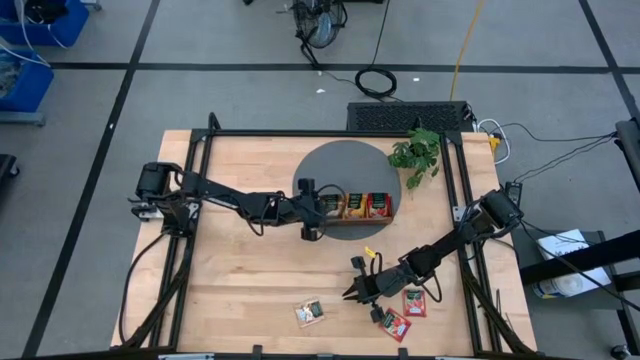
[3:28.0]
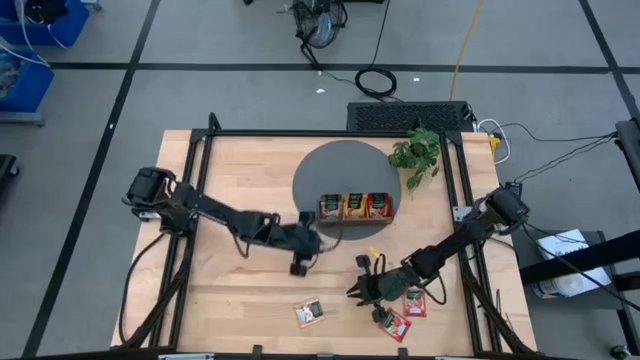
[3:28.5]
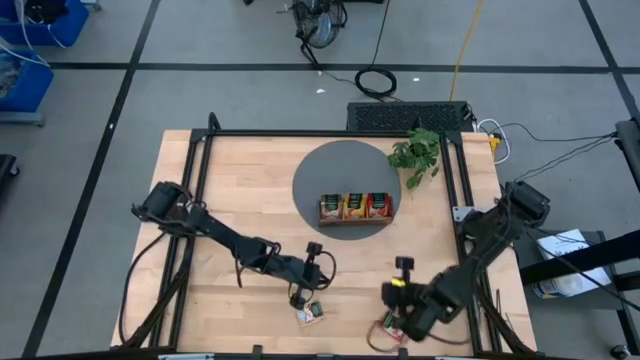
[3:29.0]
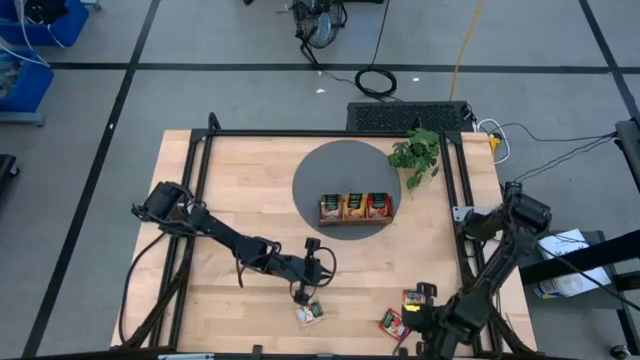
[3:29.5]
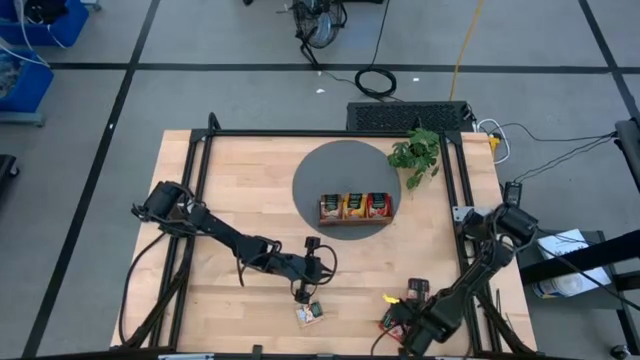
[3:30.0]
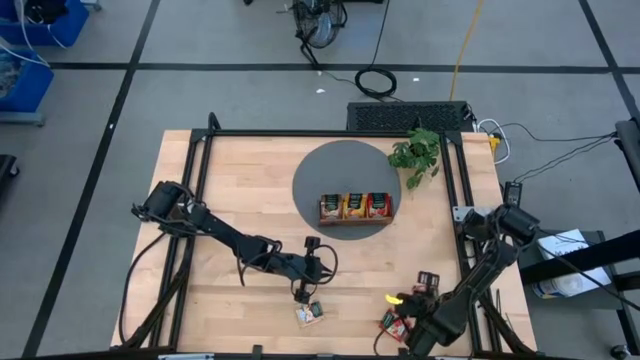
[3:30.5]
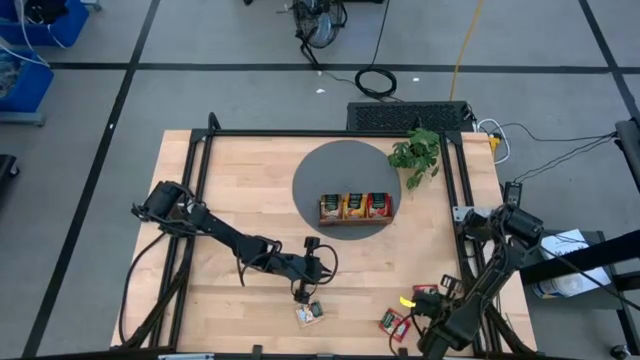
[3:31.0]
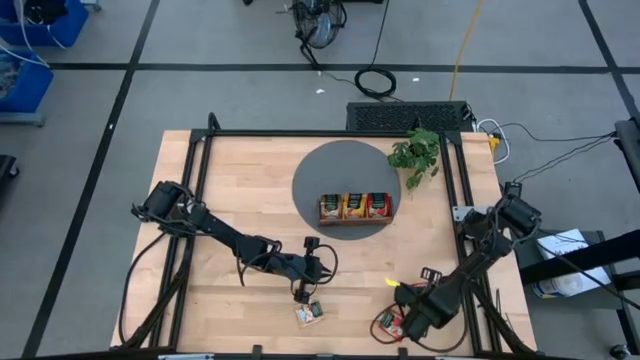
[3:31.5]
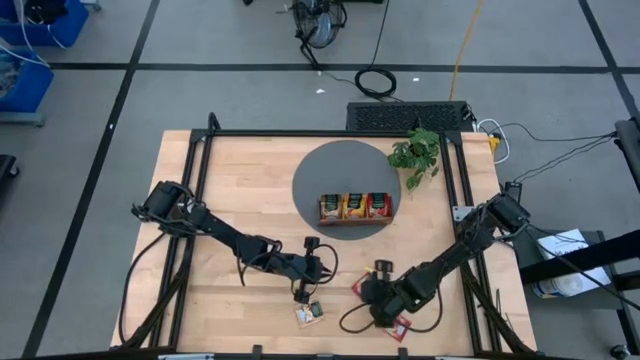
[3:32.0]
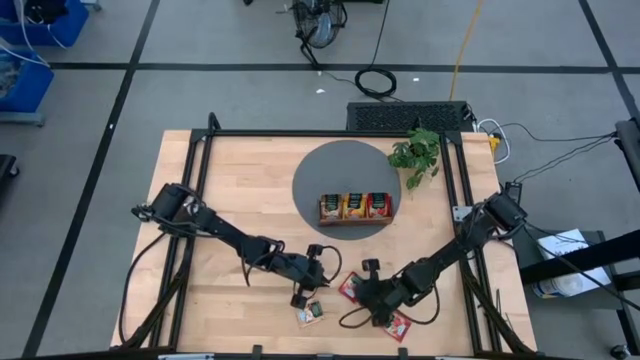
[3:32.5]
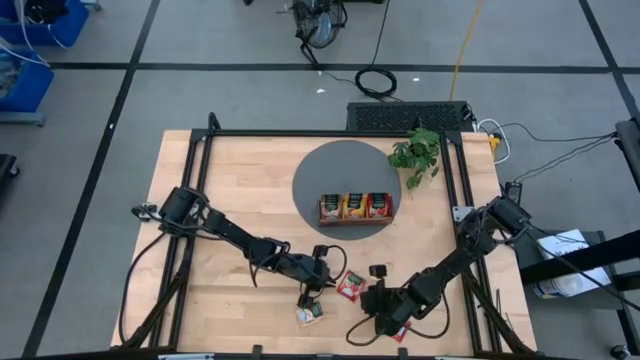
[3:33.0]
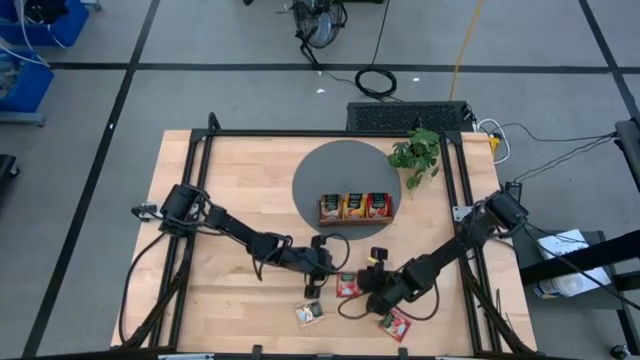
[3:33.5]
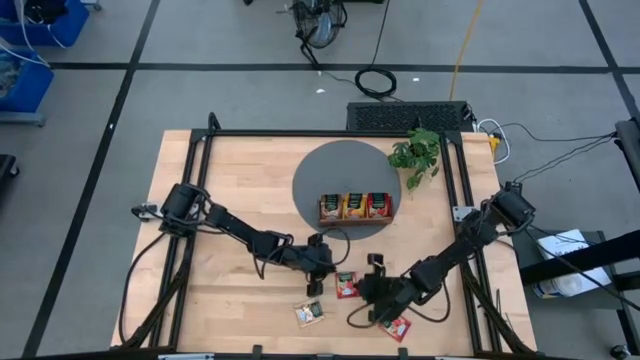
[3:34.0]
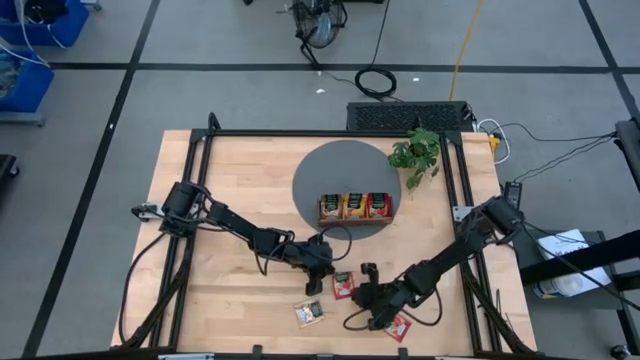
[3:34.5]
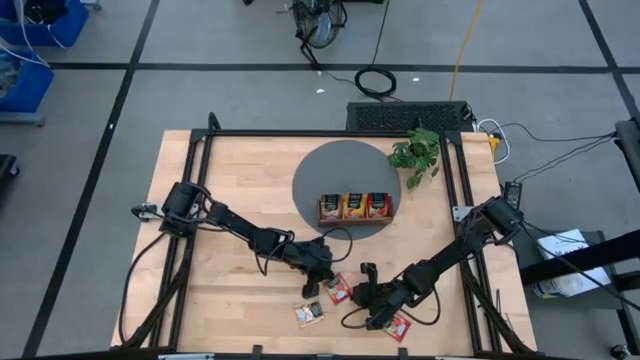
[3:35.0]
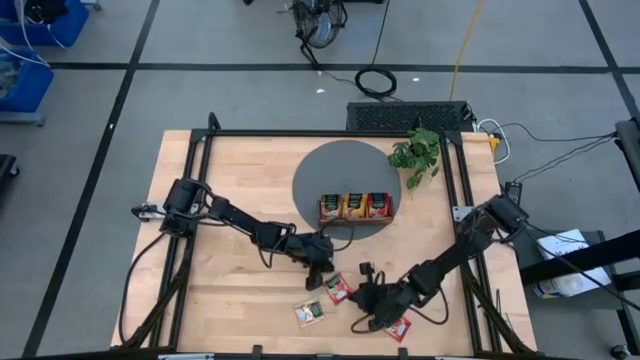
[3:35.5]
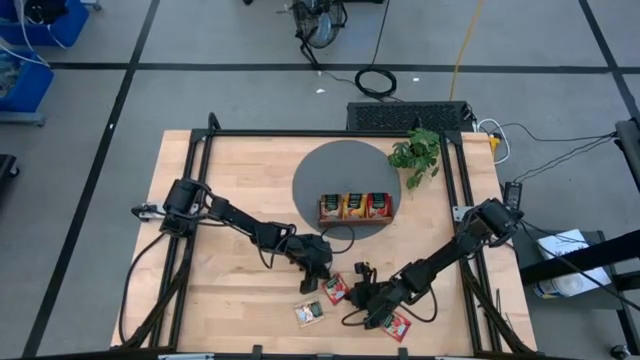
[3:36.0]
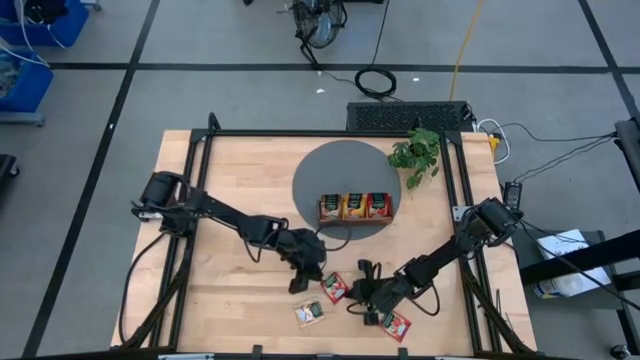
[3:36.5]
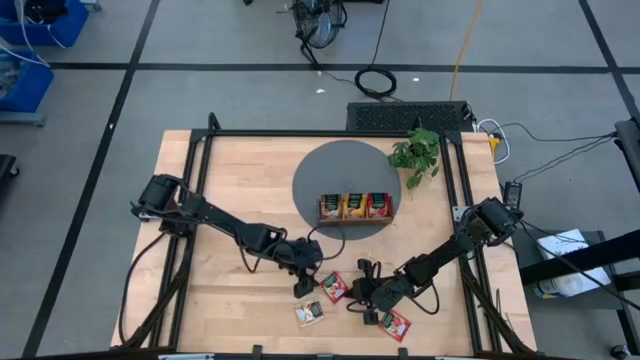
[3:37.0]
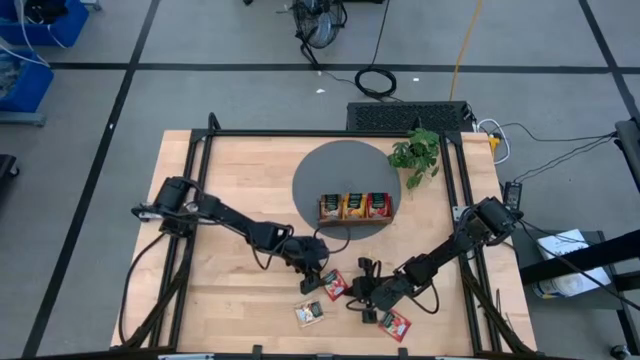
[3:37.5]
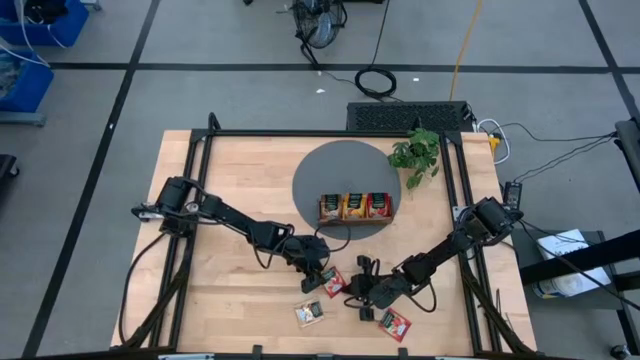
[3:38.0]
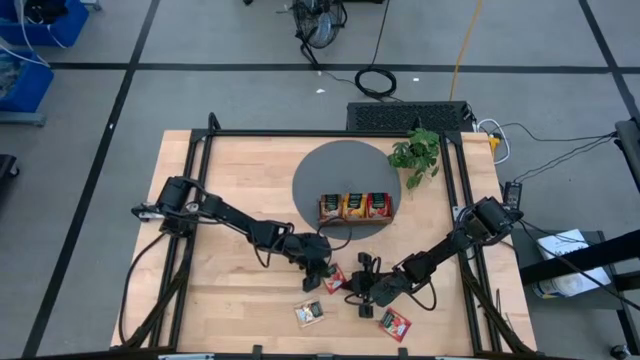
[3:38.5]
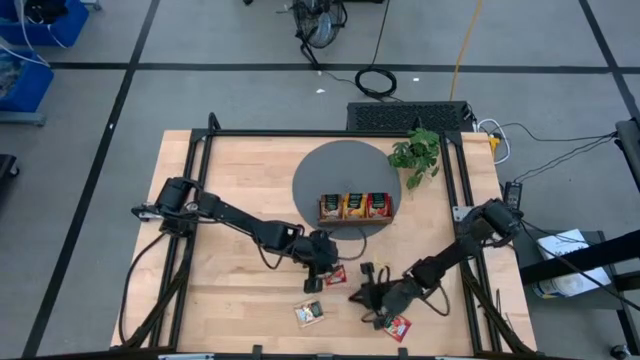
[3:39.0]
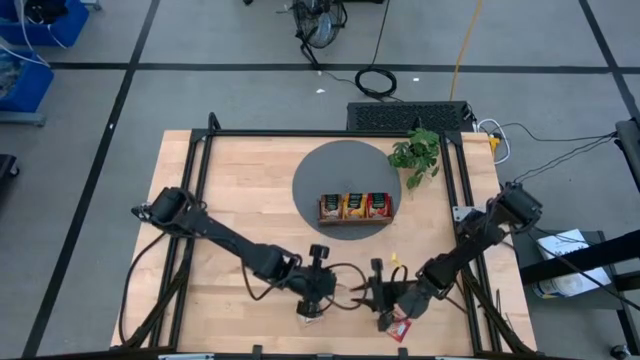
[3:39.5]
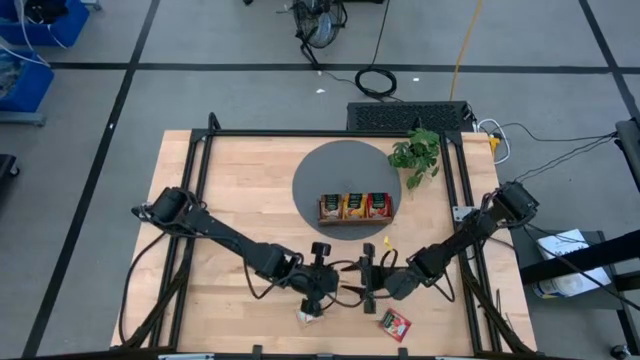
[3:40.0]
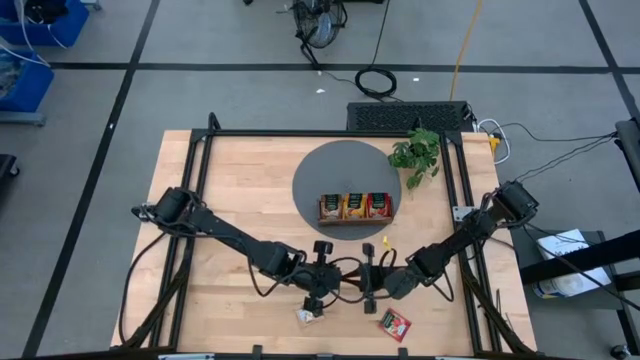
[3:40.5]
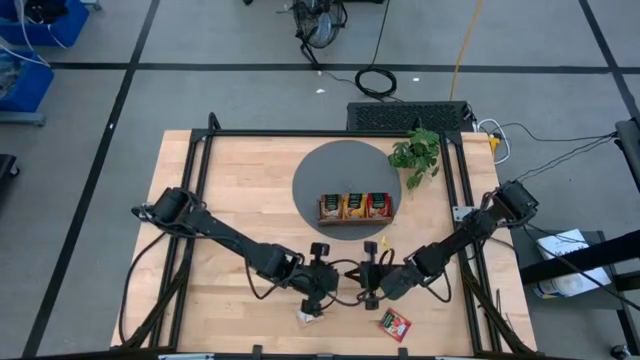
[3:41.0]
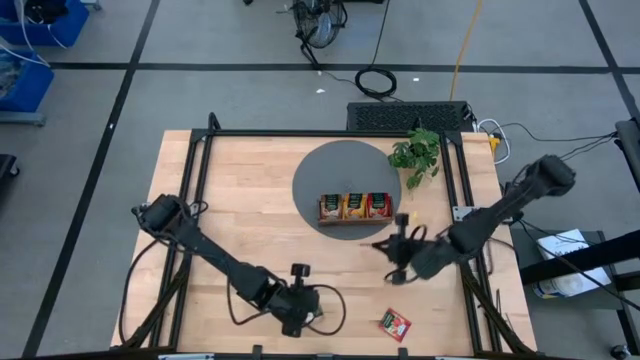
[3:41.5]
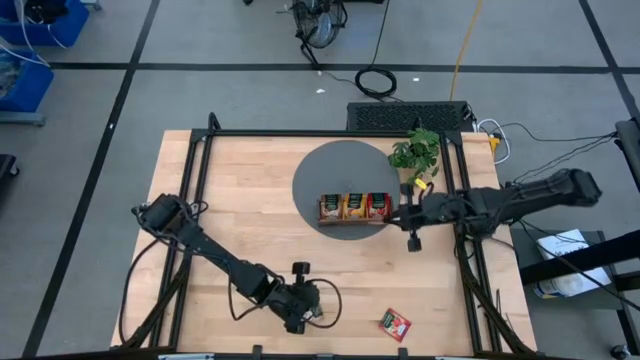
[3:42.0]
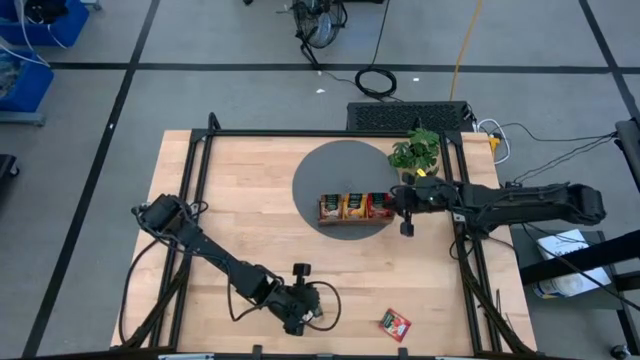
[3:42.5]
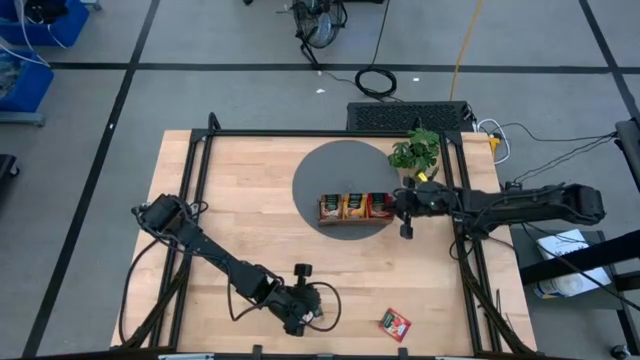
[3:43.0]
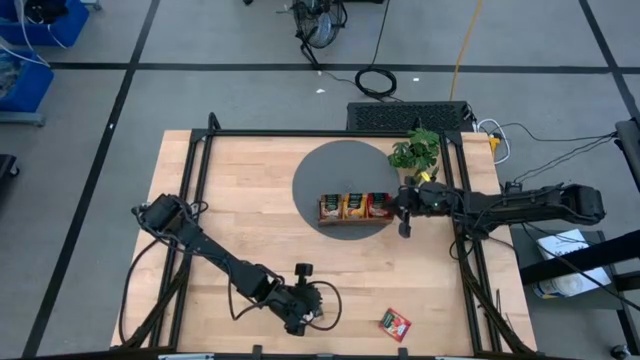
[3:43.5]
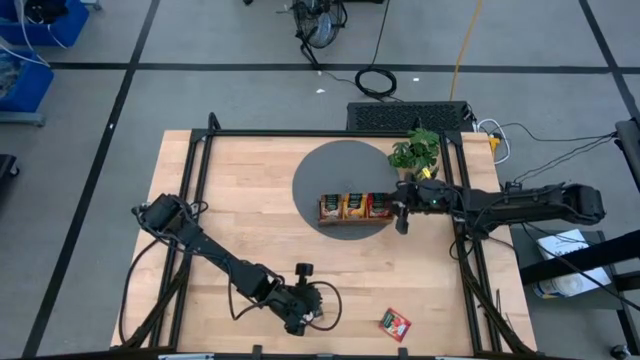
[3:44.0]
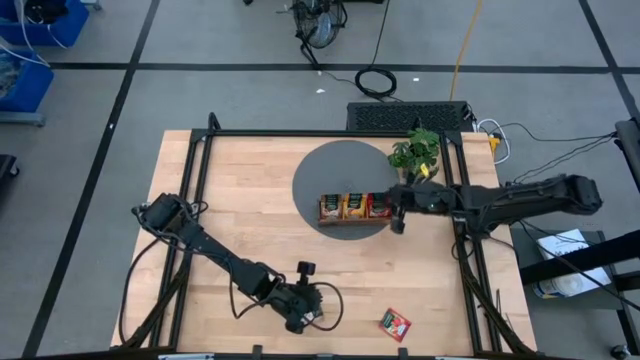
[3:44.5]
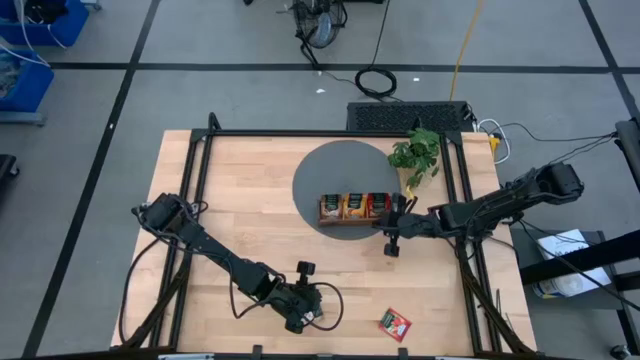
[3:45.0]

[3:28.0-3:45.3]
Task: Pick & Place Tea
Put the red tea bag into the right section of the wooden organizer

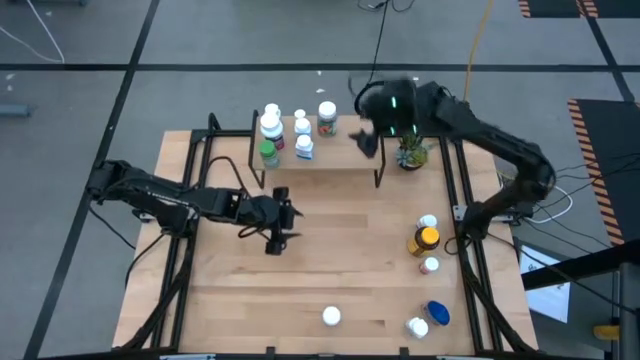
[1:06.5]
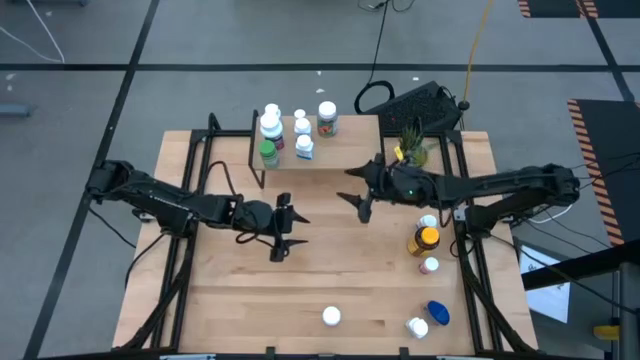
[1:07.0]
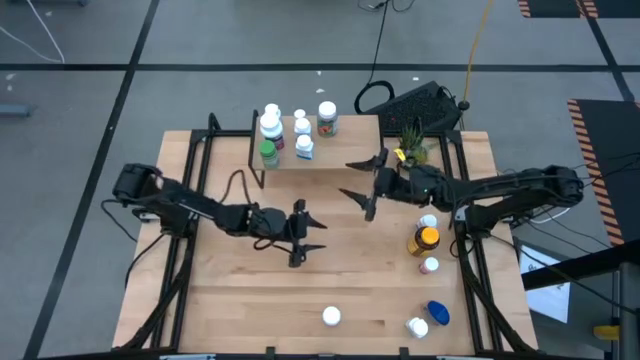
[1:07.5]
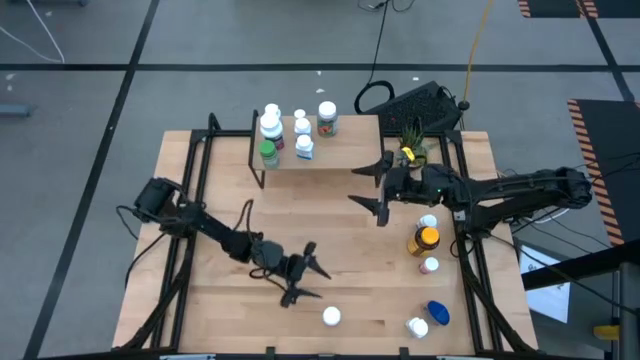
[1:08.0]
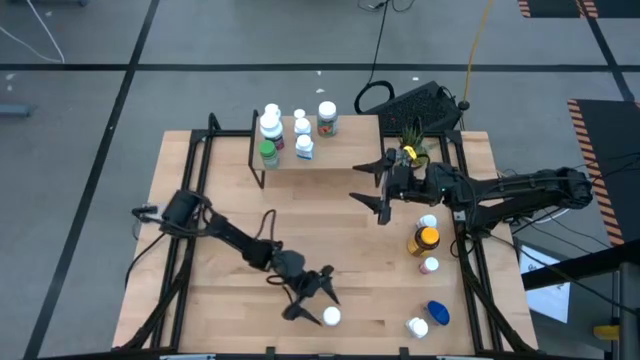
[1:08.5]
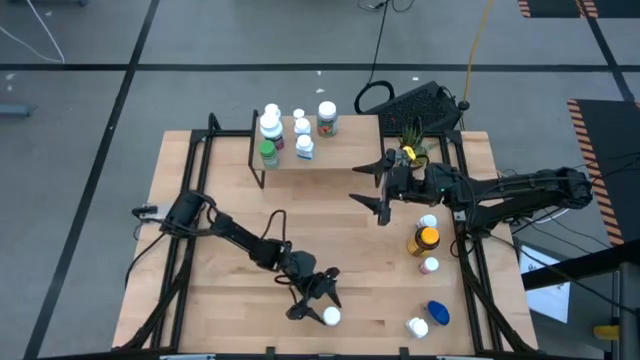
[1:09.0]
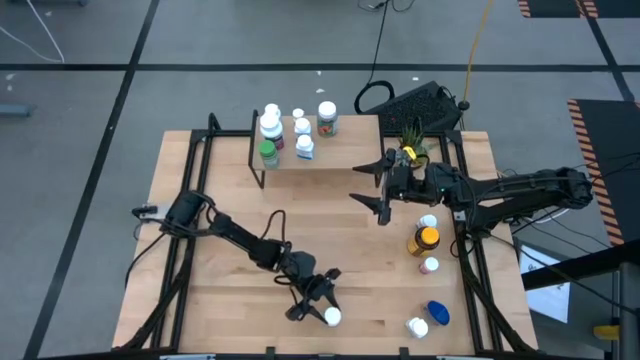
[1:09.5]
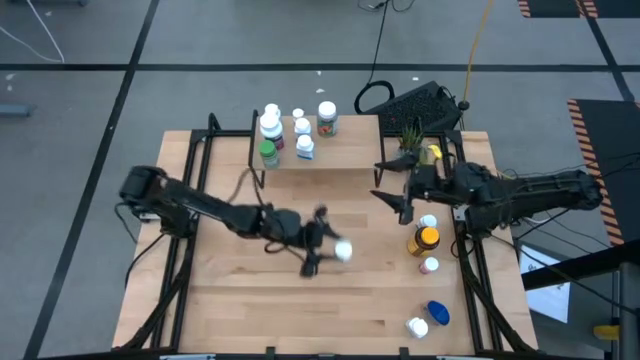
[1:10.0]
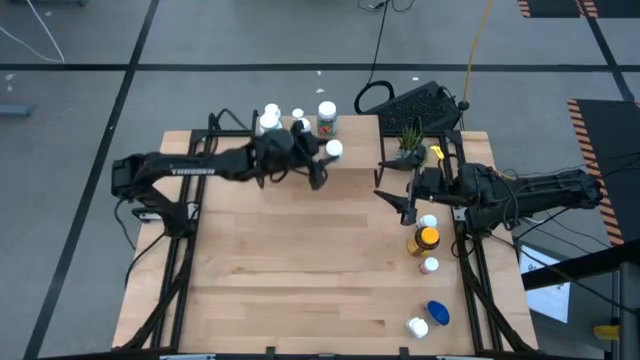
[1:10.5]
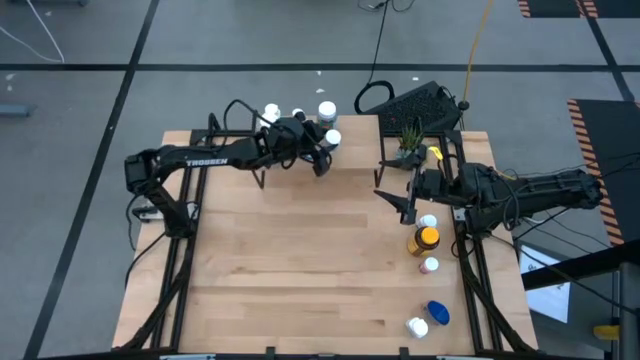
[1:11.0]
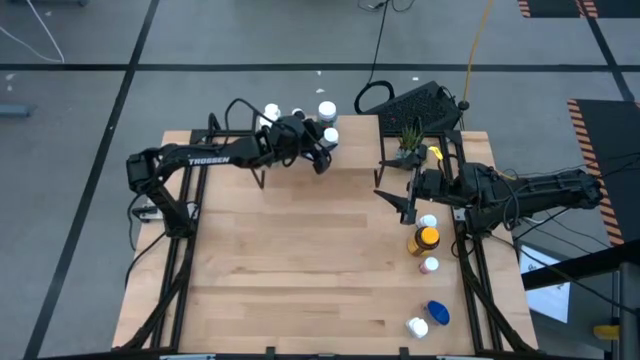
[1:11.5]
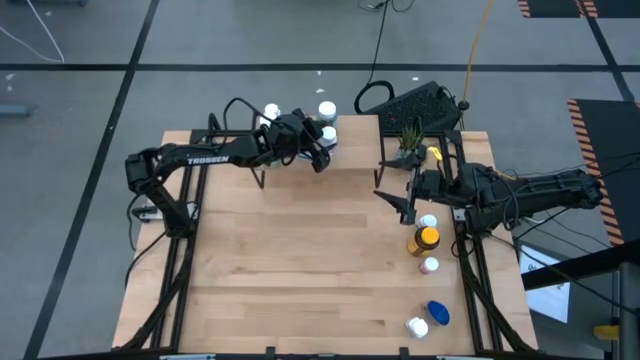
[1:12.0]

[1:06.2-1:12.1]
Task: Pick and place medicine bottles onto shelf by color
Put the white and green pill bottle on the shelf
